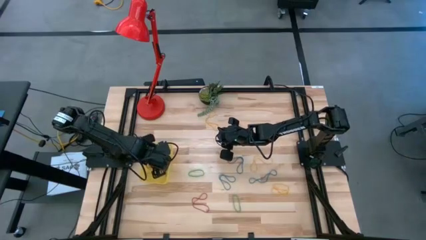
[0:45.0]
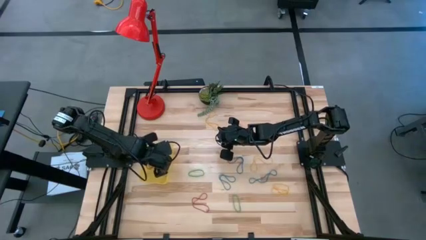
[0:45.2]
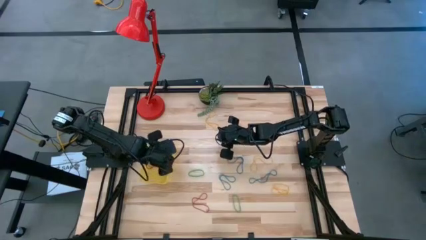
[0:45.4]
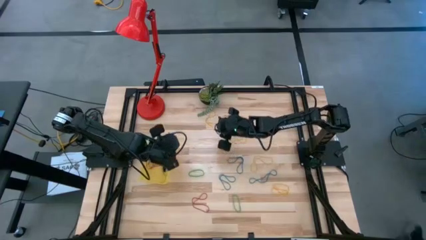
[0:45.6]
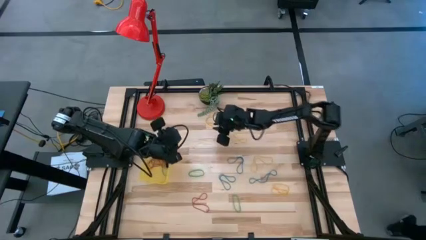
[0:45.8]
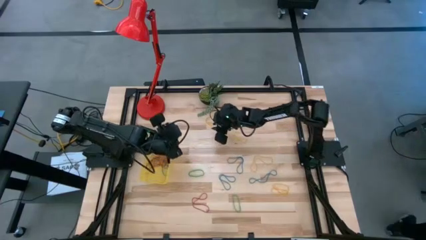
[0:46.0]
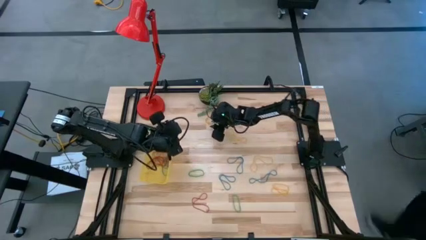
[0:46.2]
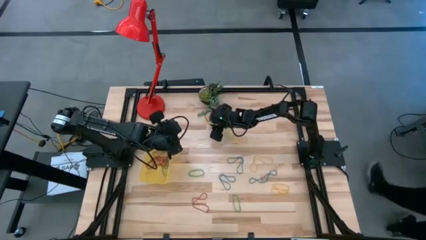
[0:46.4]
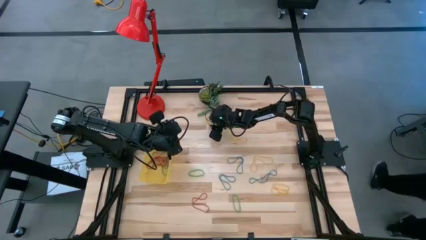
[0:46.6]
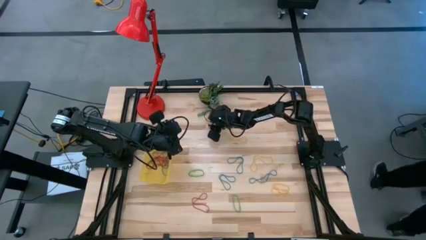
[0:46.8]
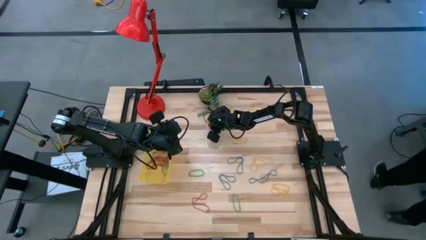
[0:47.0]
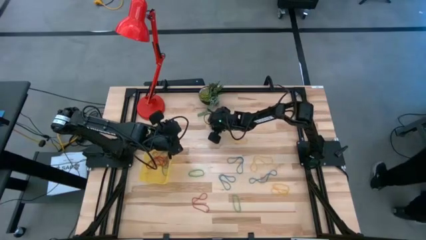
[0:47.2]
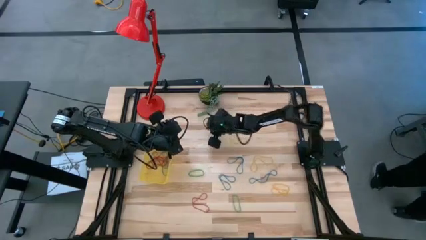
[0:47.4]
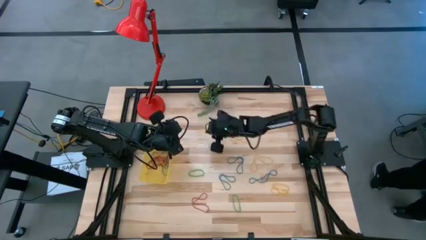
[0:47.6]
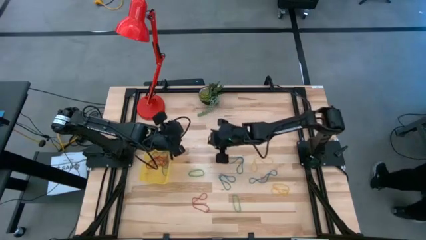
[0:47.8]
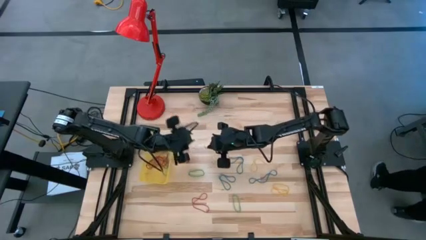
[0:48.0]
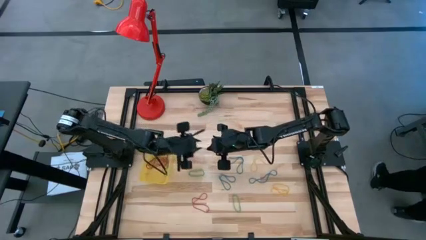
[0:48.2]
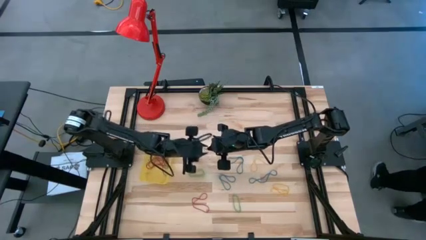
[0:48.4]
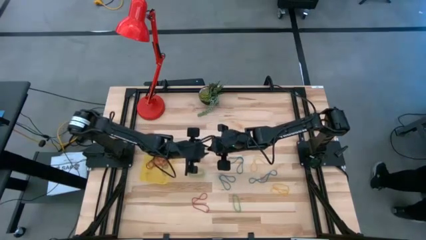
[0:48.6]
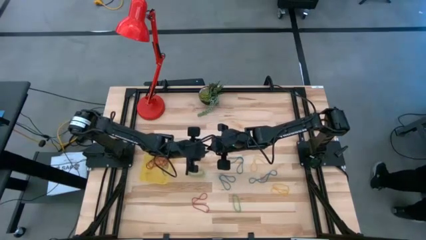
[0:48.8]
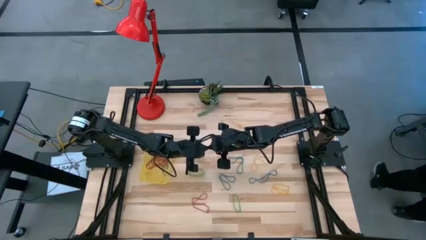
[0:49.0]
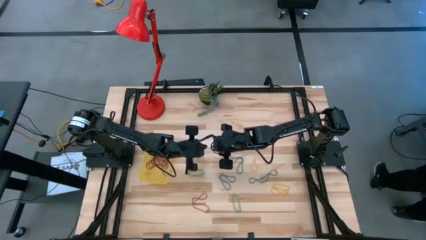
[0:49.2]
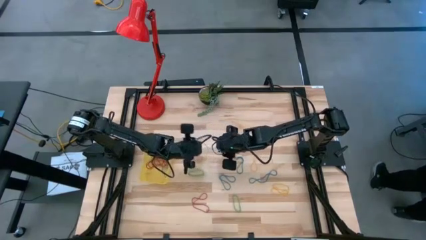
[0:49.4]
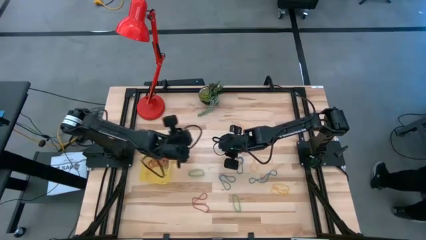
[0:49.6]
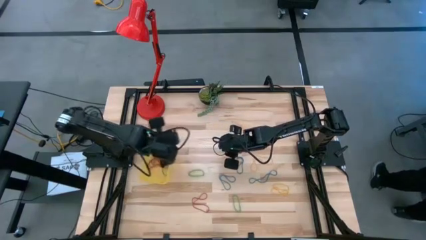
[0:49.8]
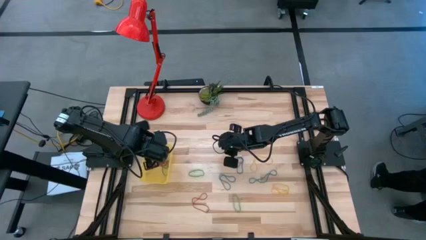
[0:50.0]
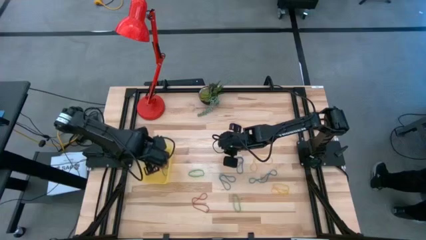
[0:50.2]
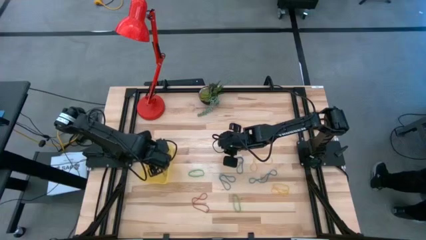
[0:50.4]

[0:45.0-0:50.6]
Task: Pick and place items into bin
Put the yellow rubber band into the yellow bin

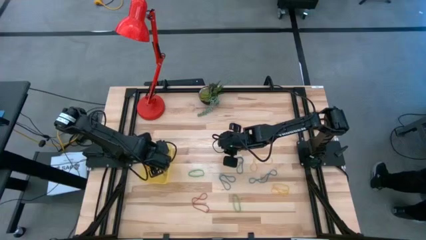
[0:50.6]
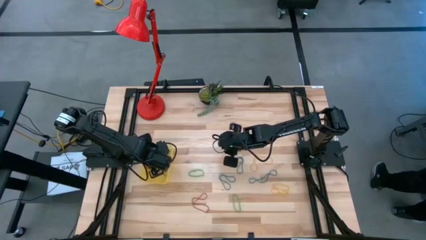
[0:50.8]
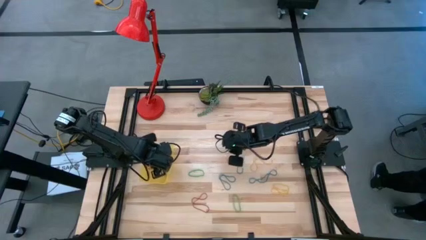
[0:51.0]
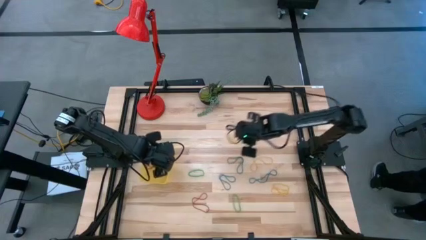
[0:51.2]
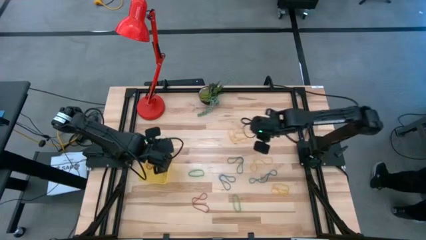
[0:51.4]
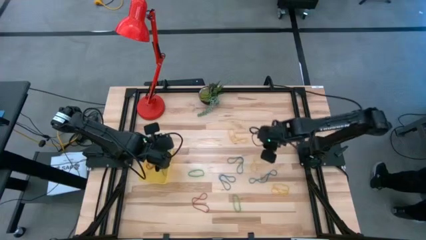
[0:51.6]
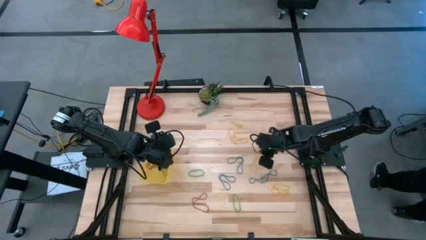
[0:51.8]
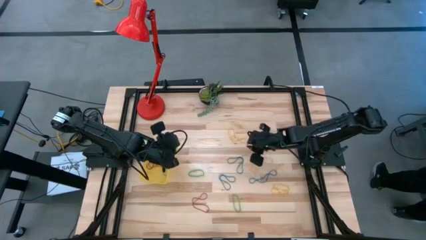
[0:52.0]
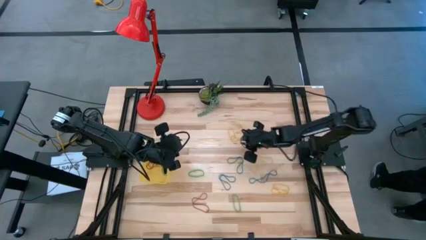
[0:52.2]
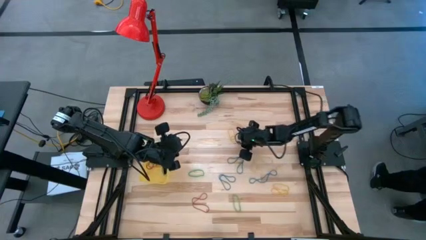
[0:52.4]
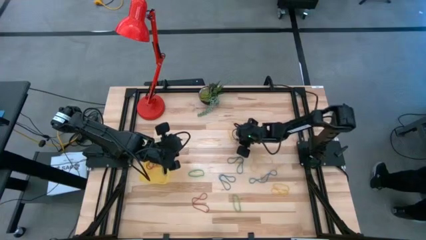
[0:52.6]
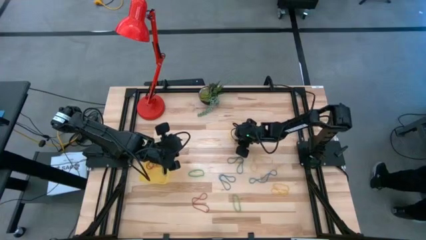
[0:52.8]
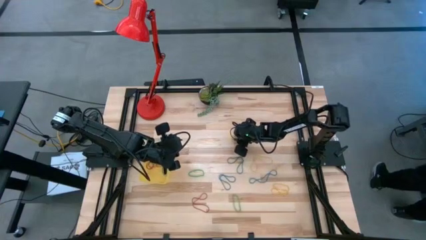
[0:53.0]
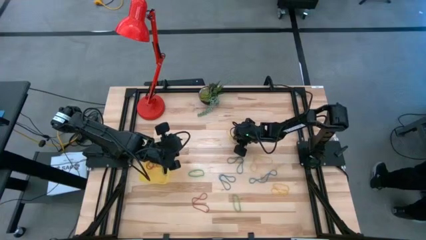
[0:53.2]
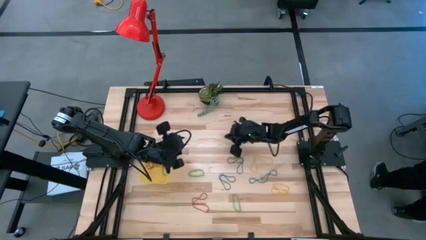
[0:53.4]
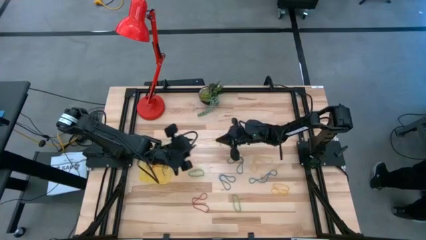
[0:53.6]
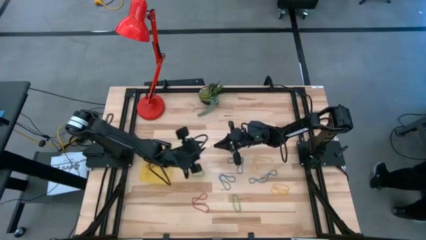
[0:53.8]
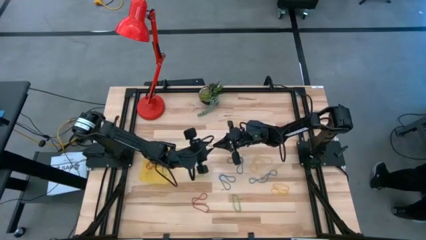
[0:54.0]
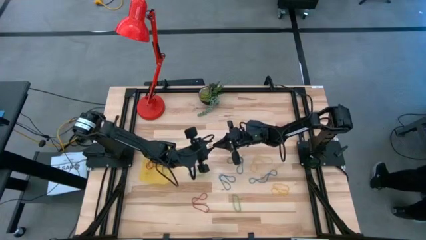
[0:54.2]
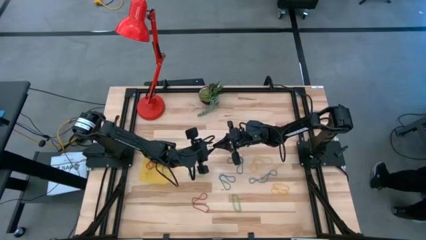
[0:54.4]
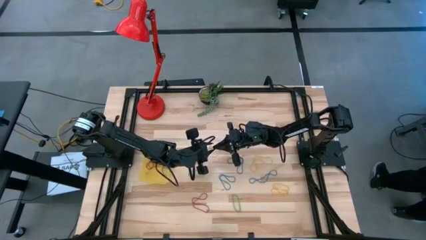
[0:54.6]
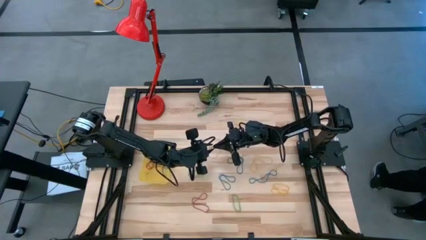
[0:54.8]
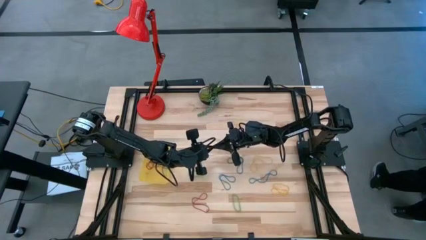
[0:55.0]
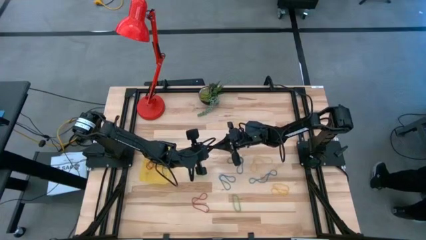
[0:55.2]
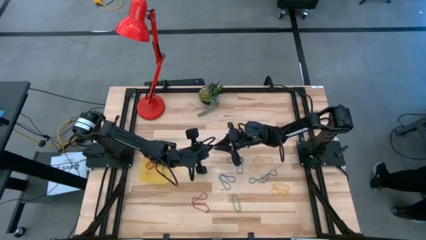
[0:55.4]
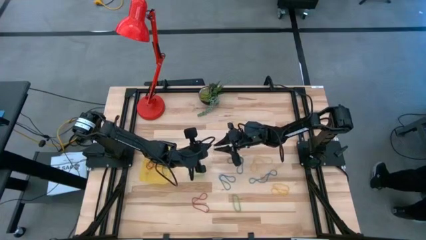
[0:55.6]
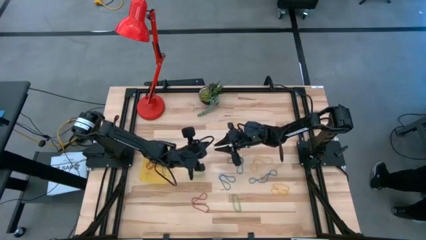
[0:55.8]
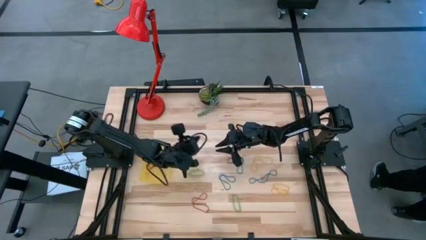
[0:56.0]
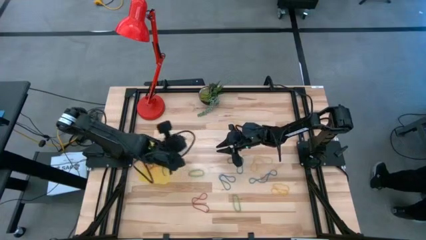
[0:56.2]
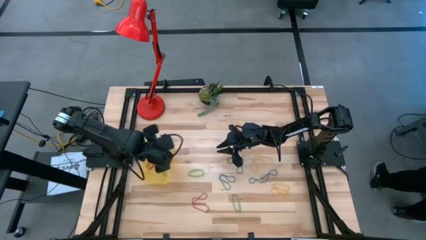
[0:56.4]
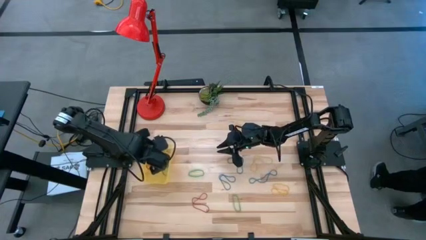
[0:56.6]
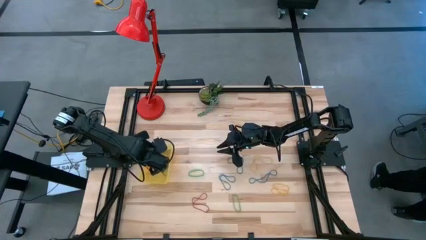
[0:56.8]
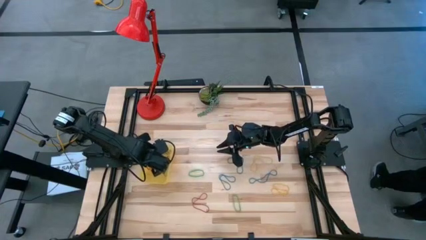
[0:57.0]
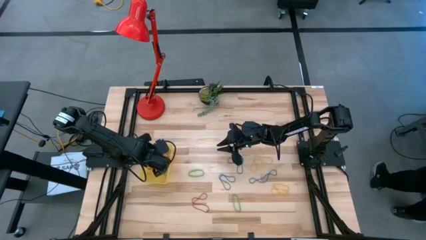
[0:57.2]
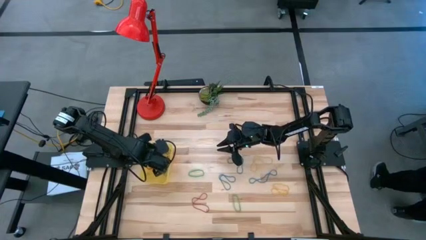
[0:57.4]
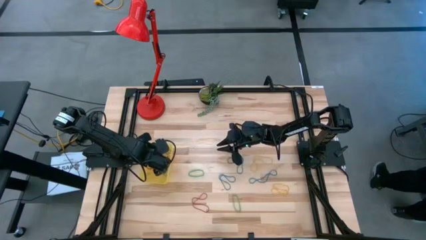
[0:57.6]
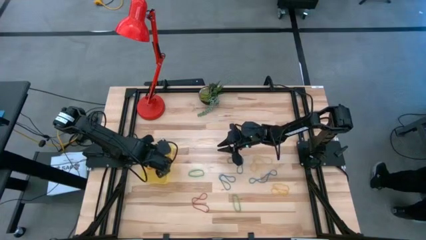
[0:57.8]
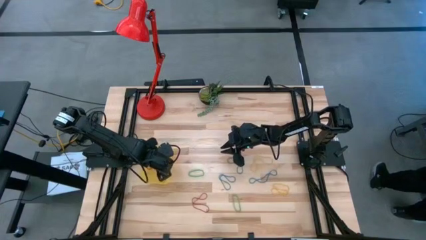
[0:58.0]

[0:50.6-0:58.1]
Put the yellow rubber band into the yellow bin

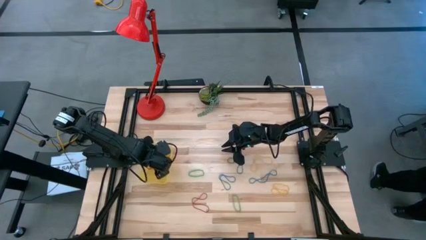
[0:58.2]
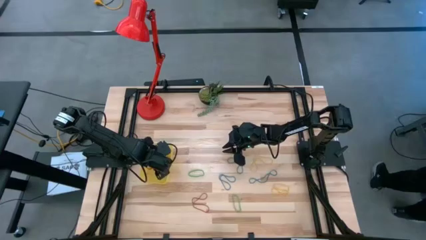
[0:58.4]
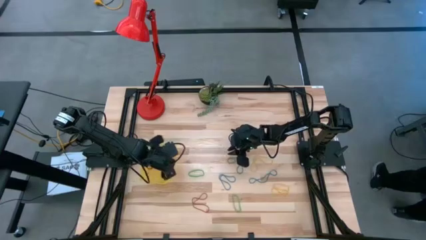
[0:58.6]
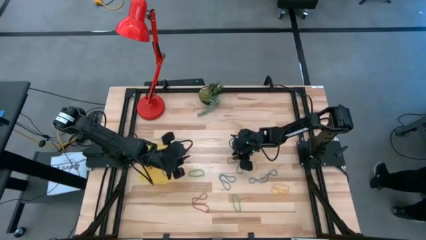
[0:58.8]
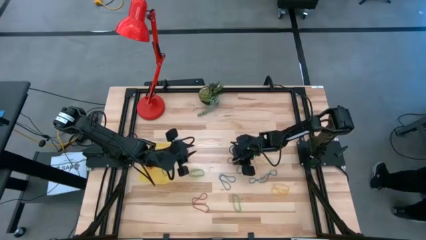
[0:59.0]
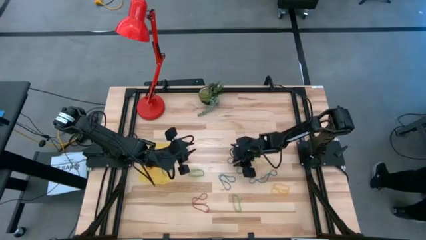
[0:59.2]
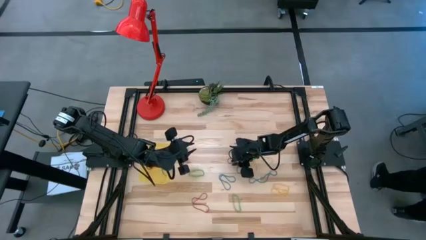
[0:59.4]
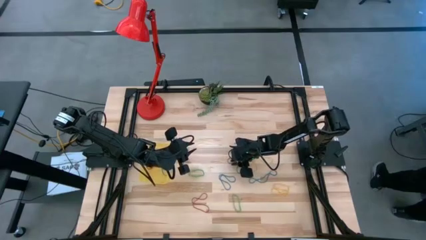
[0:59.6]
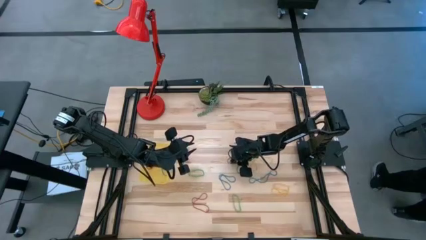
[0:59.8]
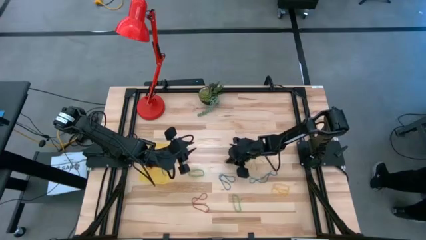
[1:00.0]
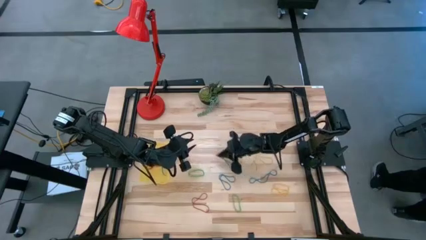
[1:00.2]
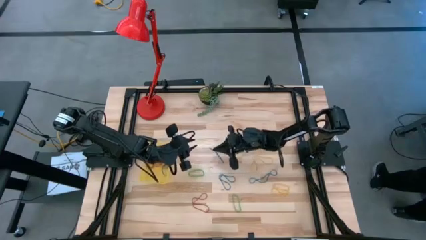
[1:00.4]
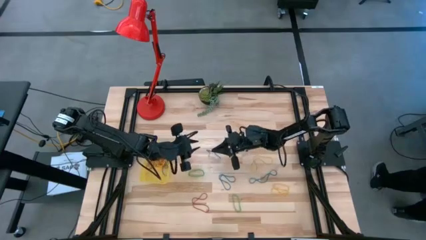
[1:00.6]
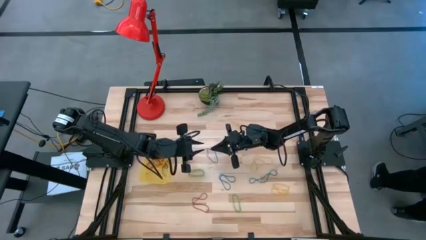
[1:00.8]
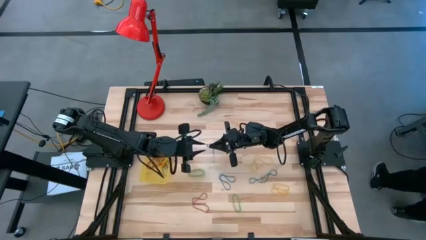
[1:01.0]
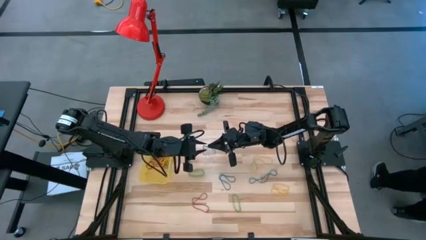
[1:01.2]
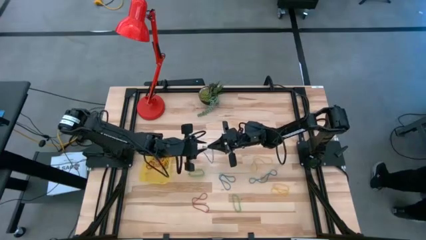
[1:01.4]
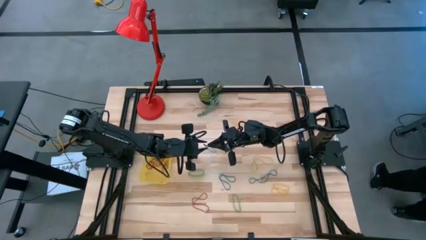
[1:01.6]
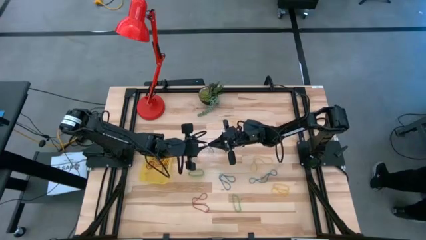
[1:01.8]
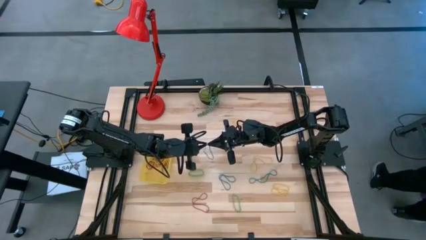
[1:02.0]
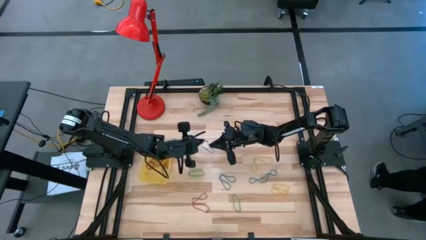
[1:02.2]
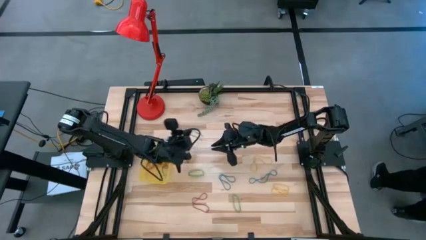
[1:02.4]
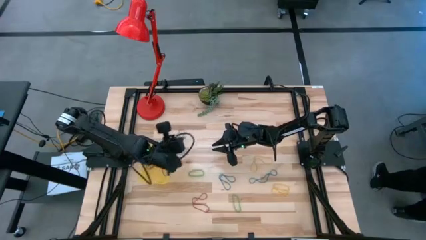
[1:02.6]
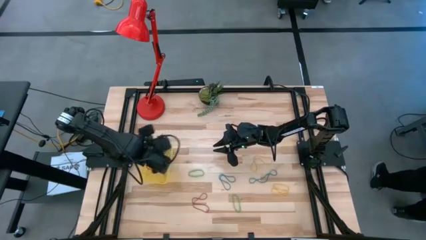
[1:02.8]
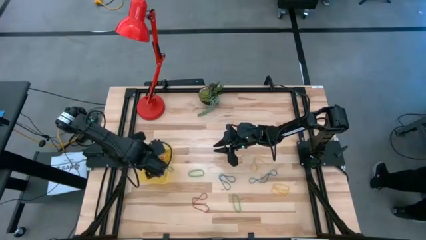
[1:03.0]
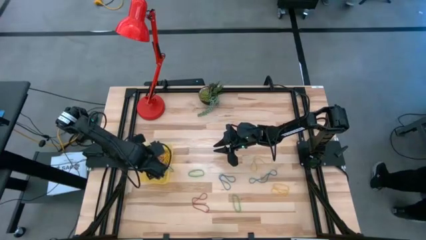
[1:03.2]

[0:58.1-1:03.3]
Put the blue rubber band into the yellow bin
